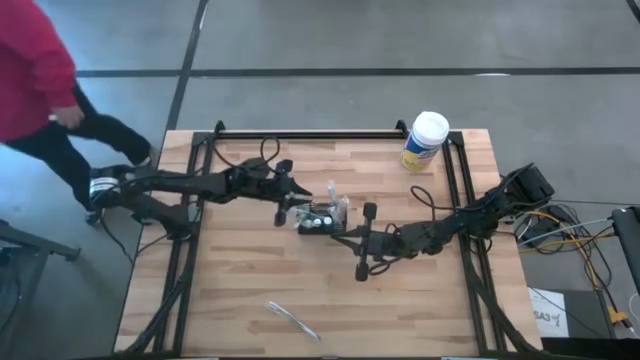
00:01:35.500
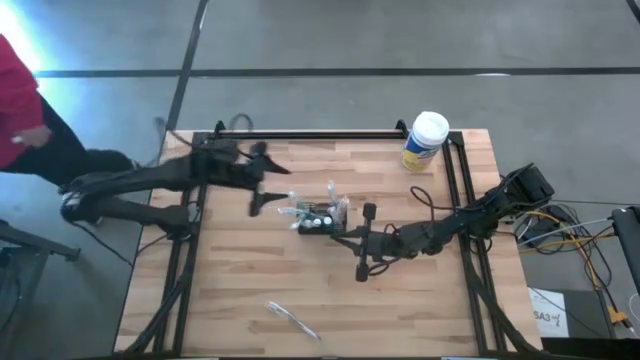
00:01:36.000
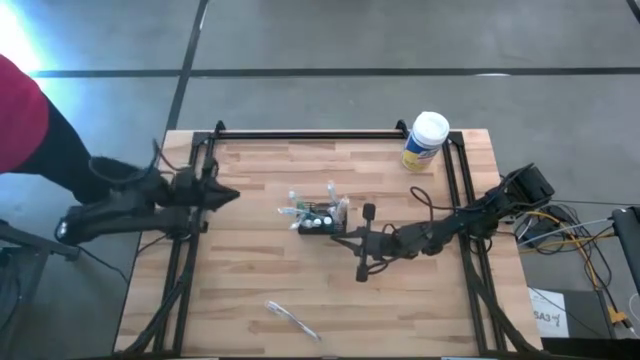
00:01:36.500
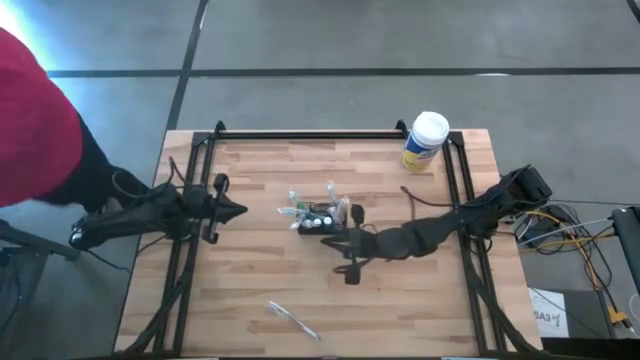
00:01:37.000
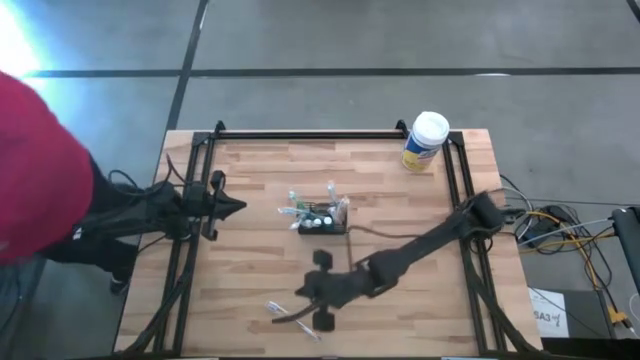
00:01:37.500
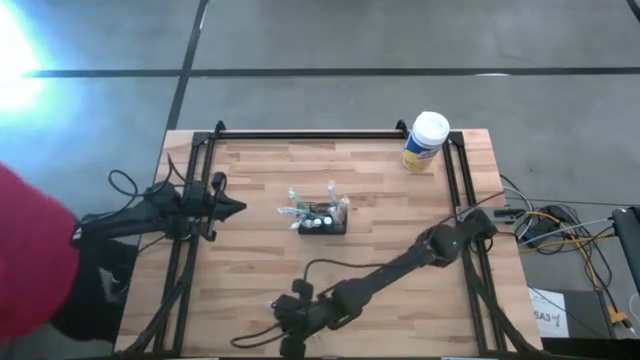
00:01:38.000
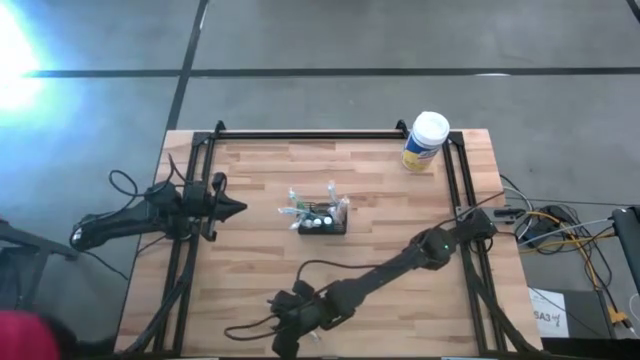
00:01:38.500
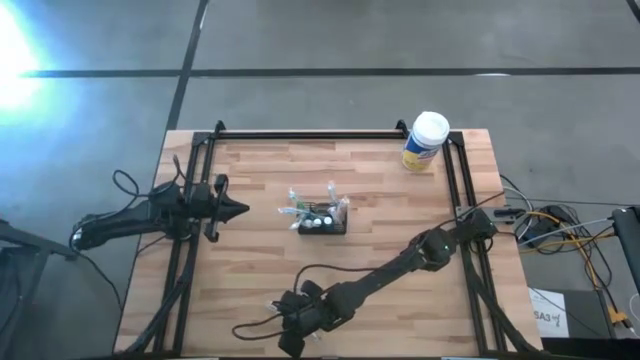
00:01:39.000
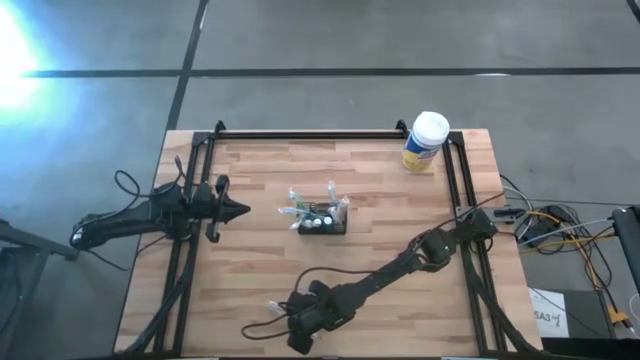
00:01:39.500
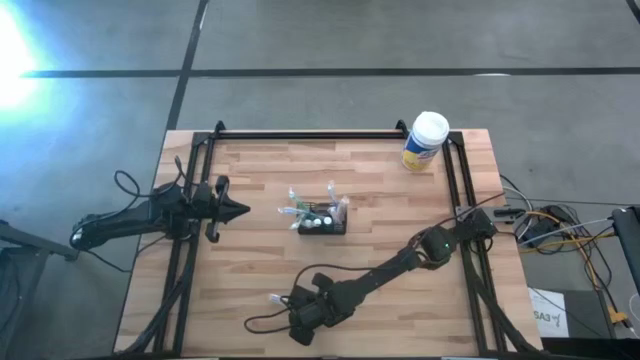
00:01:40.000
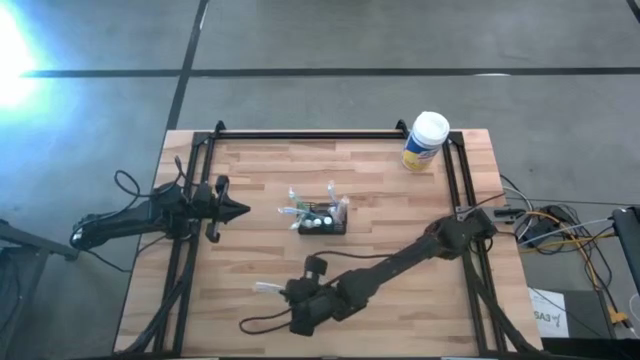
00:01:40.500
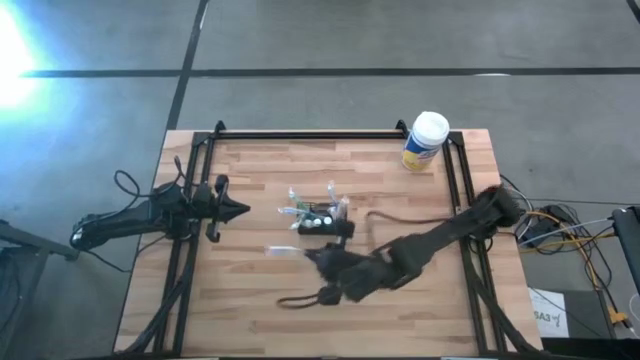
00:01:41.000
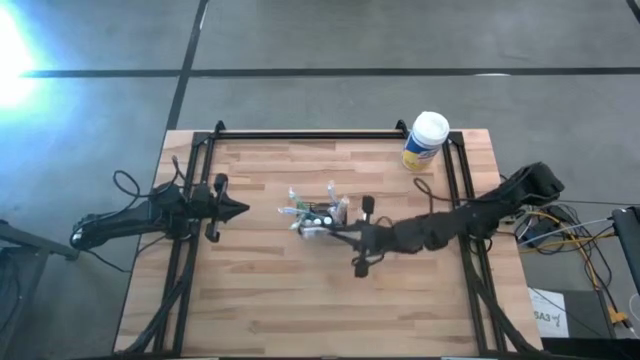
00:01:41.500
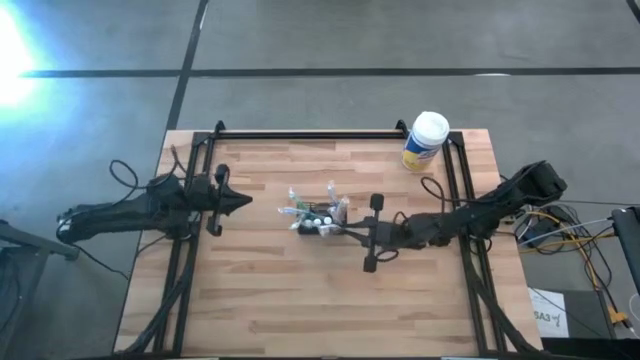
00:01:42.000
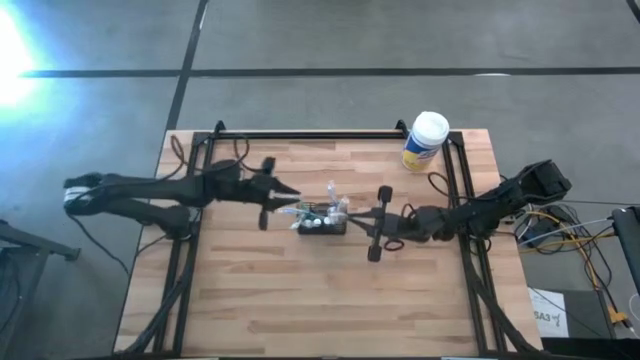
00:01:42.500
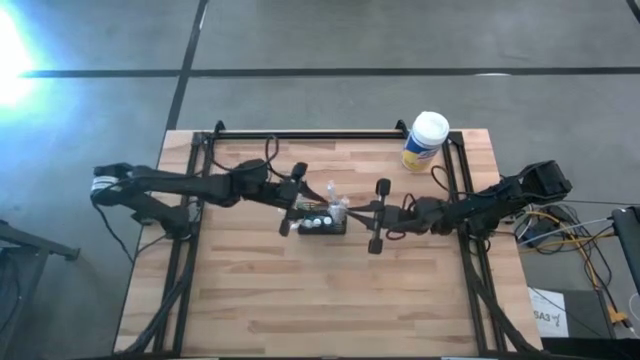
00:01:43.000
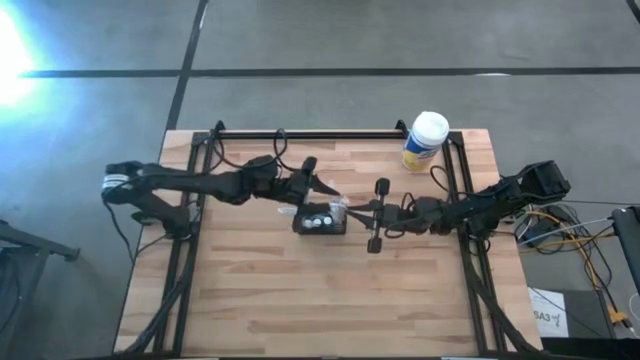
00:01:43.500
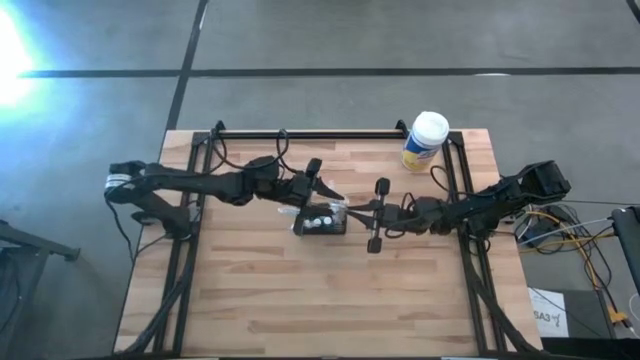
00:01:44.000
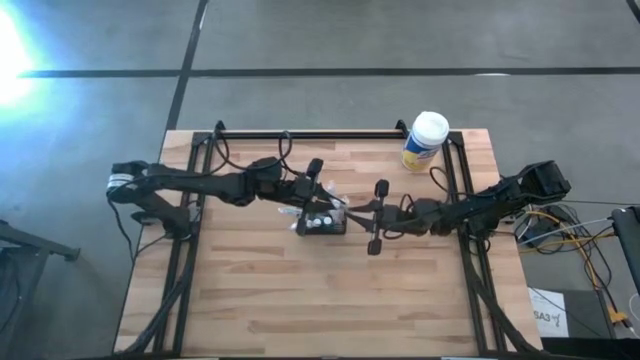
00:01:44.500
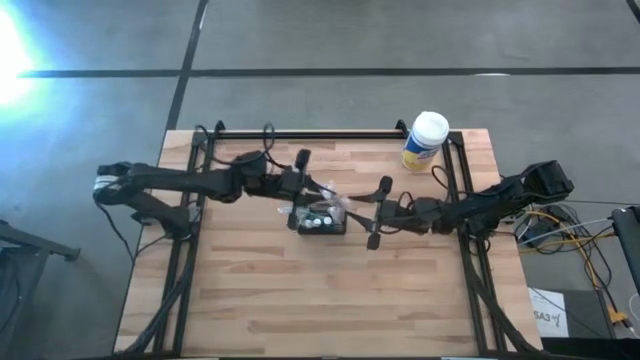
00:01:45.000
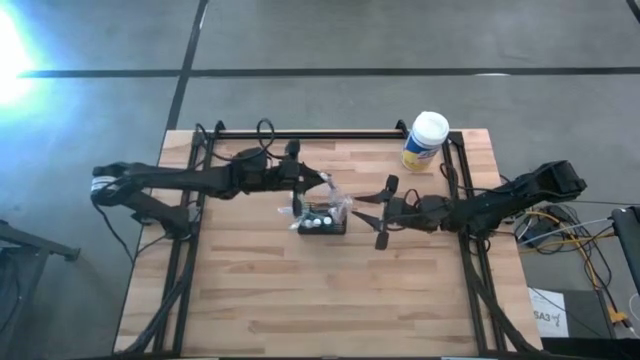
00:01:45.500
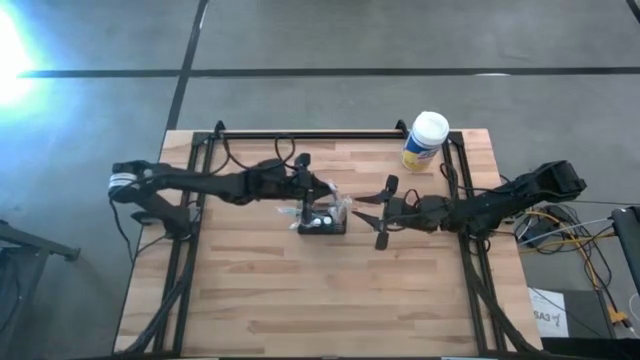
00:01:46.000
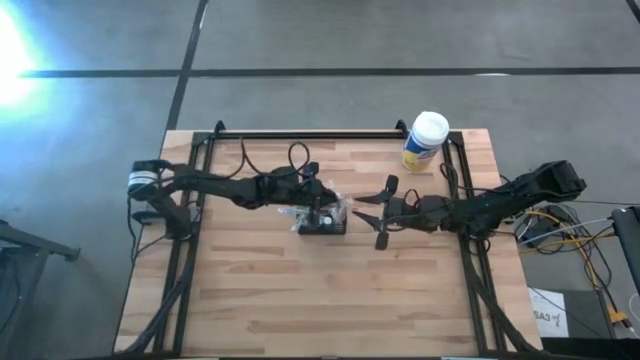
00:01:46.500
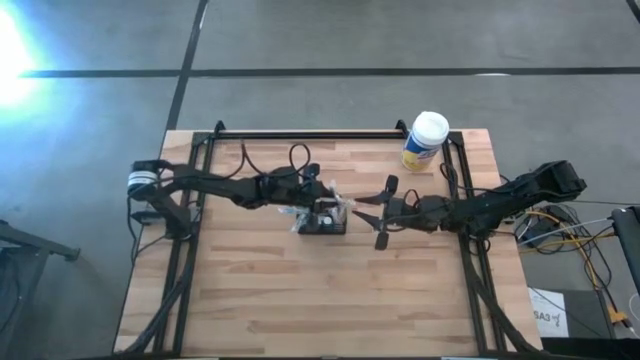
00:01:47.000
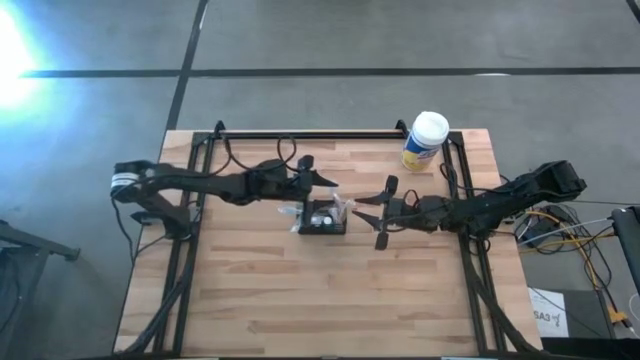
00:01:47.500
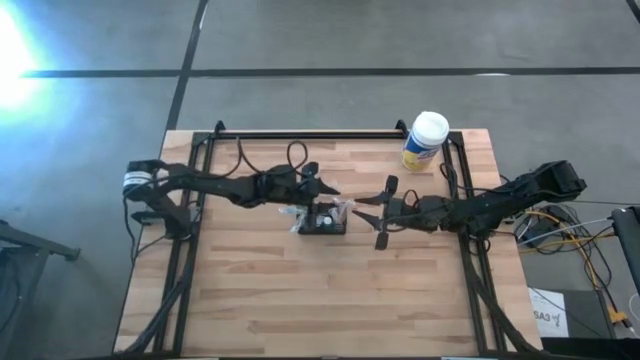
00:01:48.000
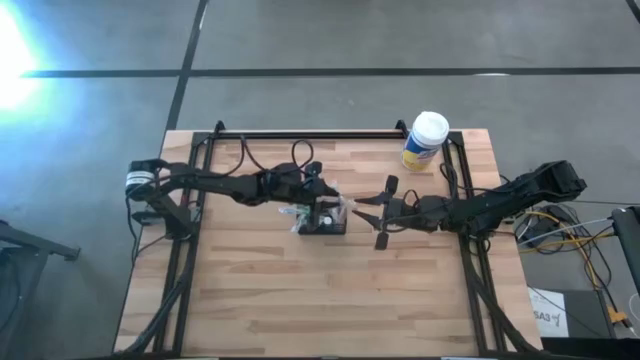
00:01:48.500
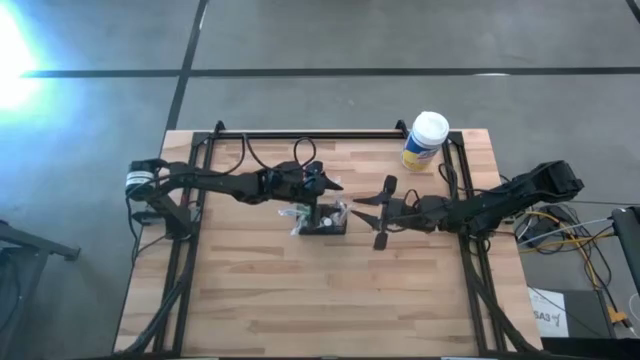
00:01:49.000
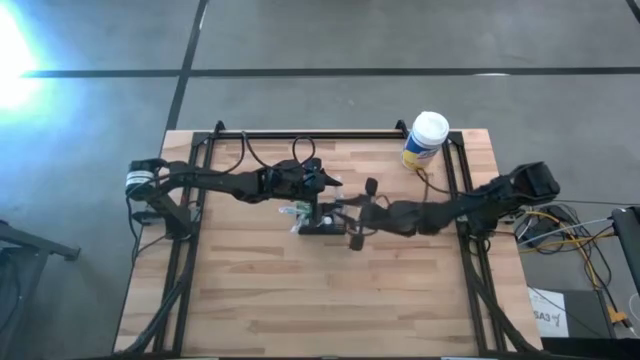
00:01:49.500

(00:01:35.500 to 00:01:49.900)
Task: Pick & Place toothbrushing station
Put the purple toothbrush into the black mesh organizer

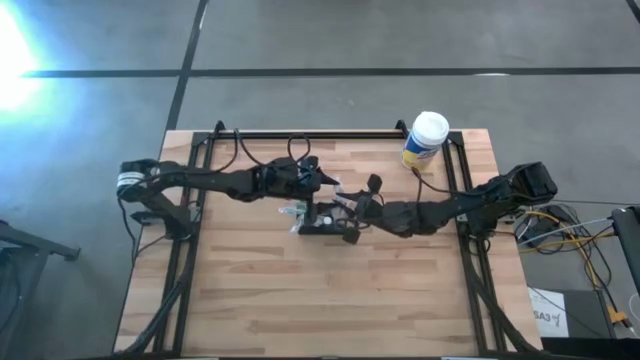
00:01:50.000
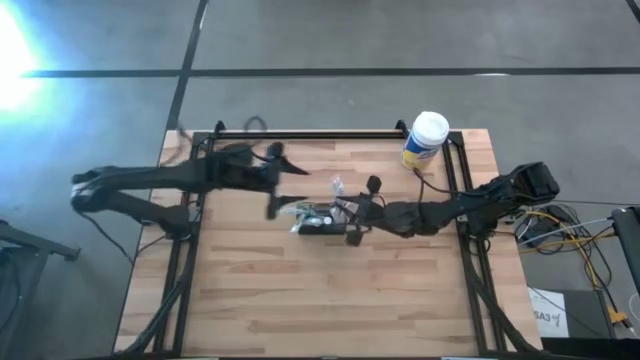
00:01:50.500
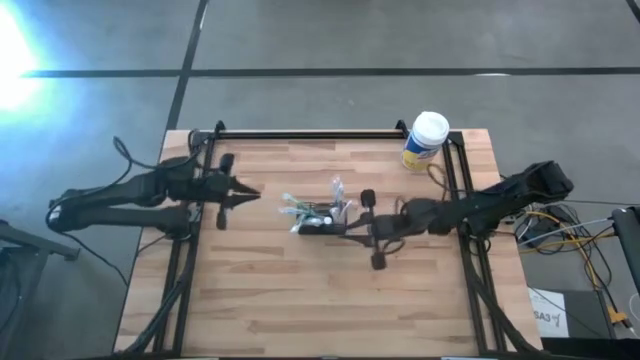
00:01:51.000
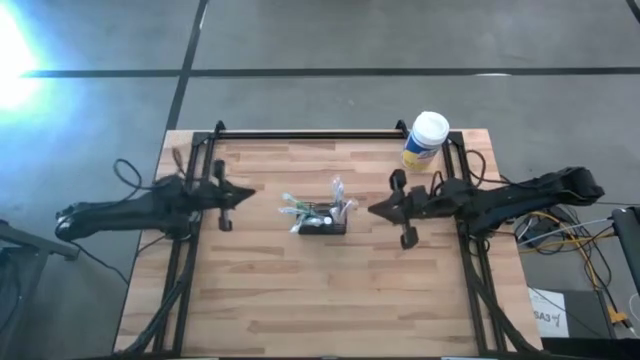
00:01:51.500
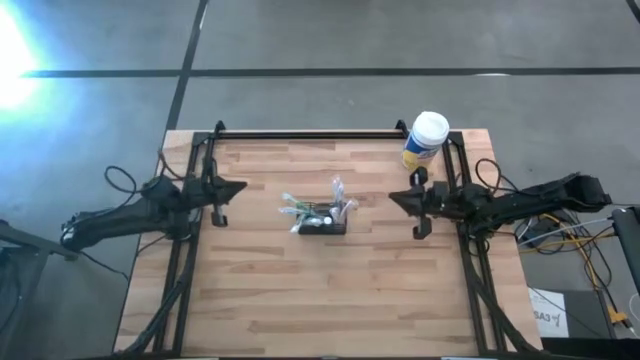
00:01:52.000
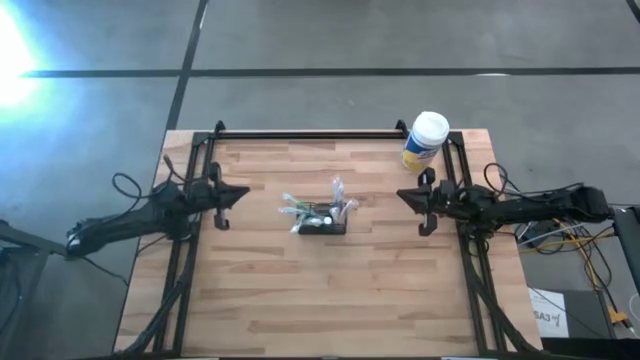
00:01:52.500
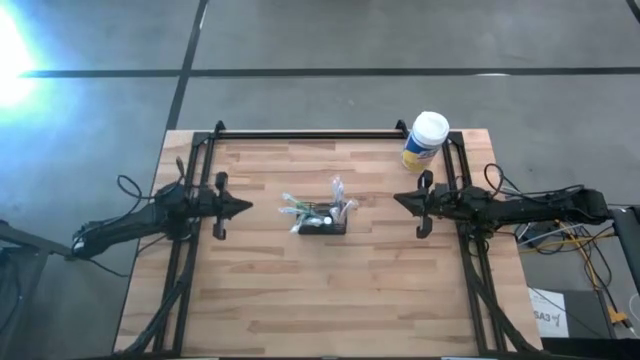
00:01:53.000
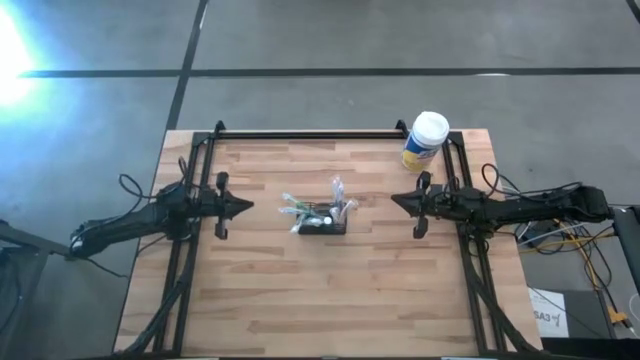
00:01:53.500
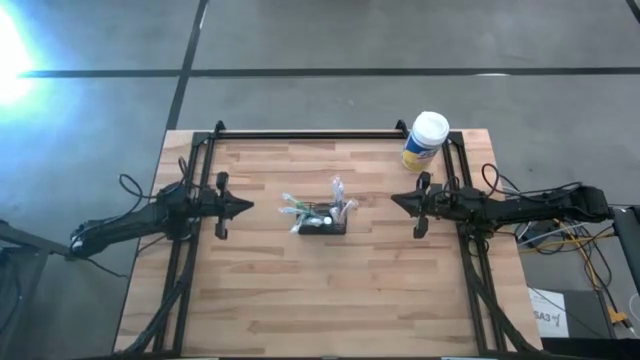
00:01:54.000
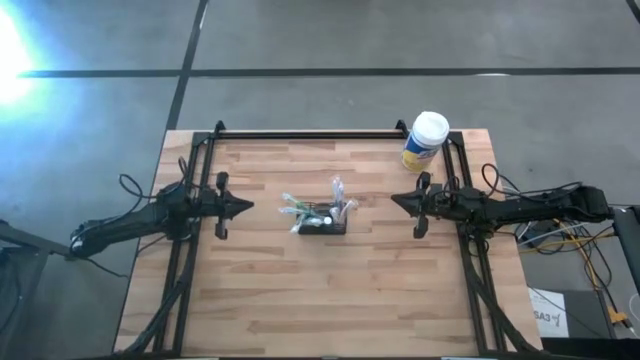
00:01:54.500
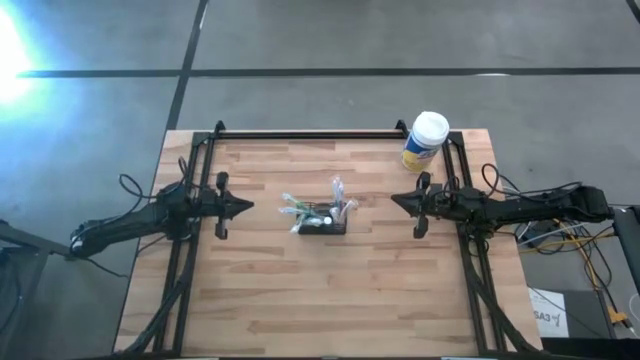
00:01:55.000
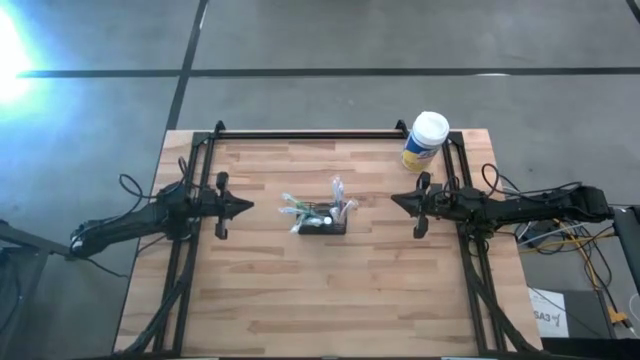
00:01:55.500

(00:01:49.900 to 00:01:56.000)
Return to Home Position
